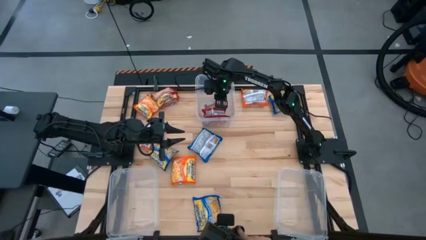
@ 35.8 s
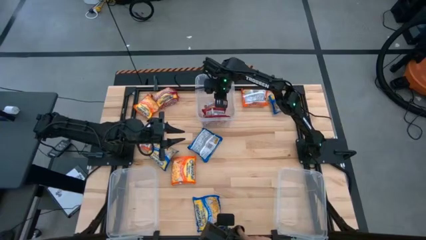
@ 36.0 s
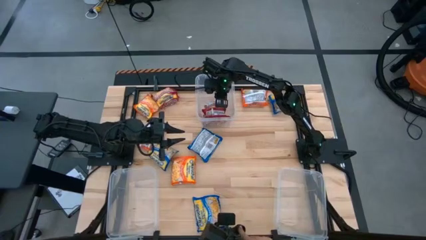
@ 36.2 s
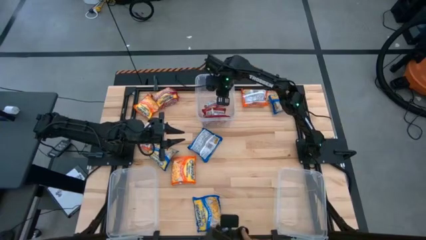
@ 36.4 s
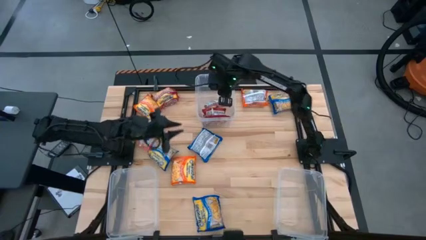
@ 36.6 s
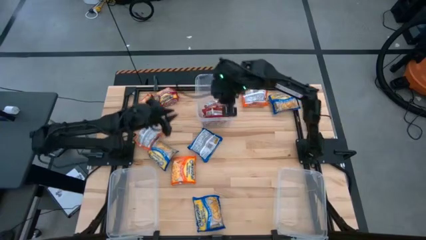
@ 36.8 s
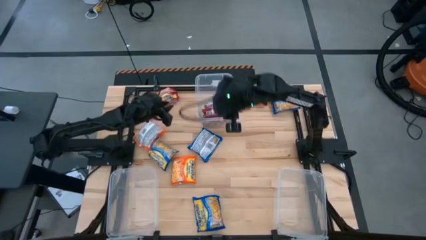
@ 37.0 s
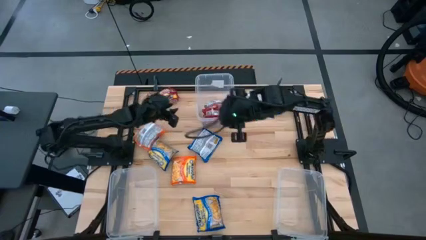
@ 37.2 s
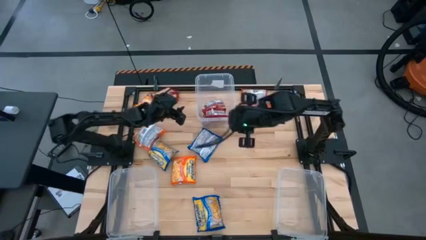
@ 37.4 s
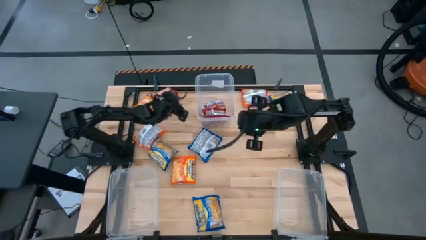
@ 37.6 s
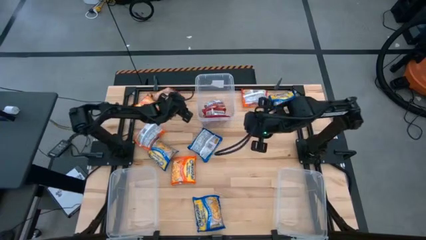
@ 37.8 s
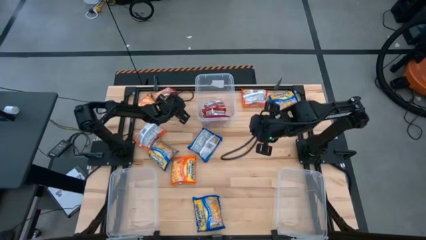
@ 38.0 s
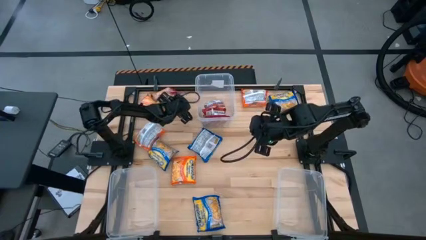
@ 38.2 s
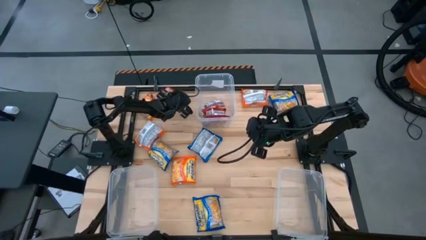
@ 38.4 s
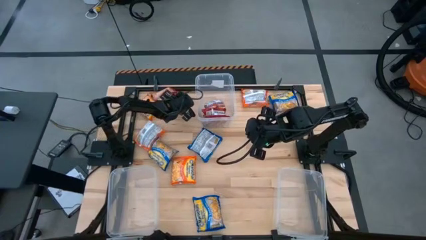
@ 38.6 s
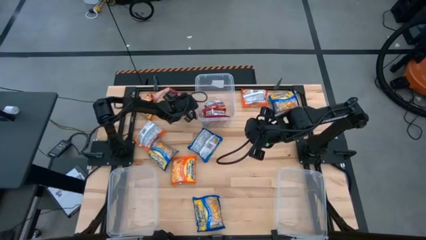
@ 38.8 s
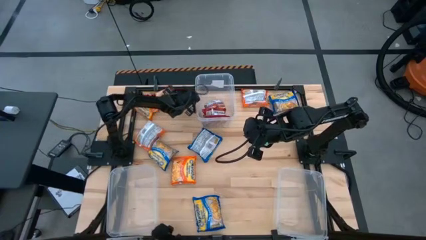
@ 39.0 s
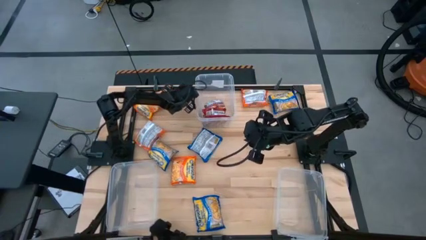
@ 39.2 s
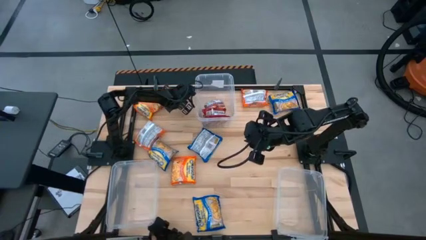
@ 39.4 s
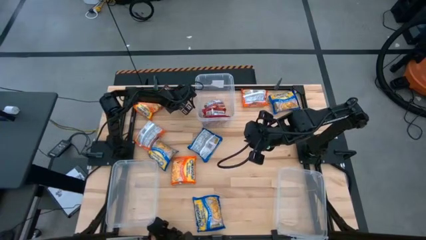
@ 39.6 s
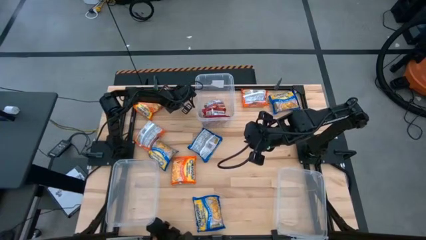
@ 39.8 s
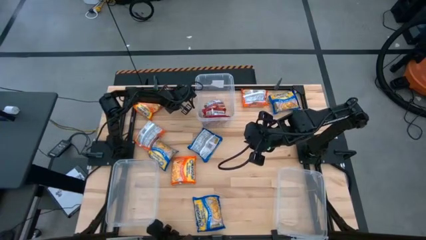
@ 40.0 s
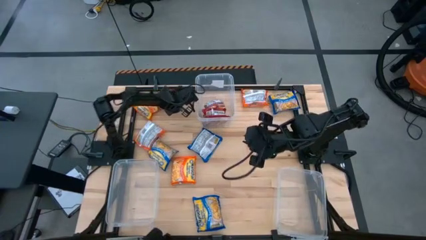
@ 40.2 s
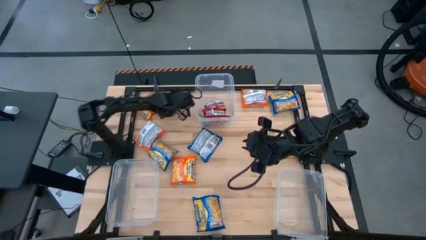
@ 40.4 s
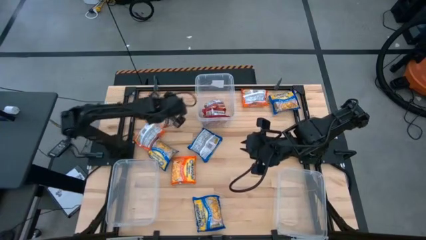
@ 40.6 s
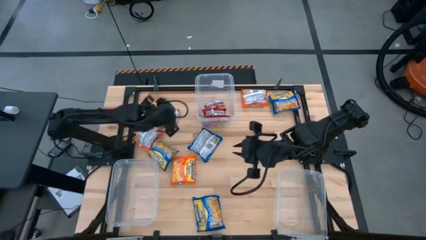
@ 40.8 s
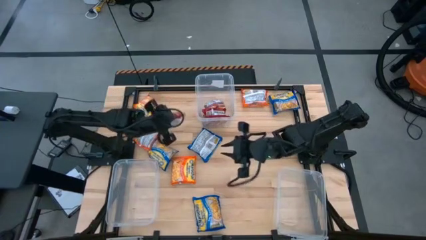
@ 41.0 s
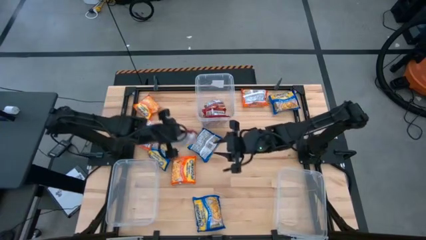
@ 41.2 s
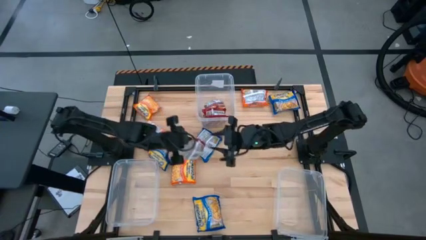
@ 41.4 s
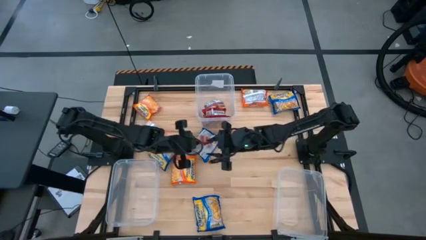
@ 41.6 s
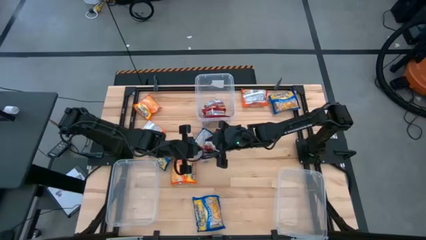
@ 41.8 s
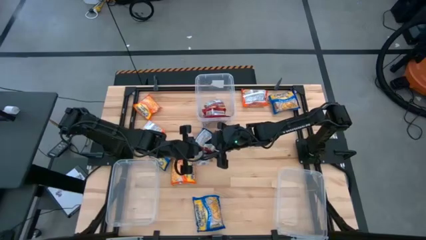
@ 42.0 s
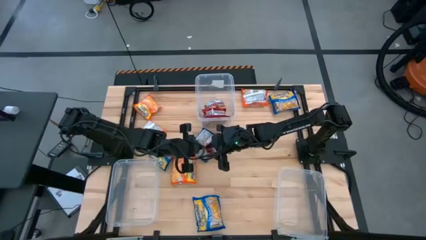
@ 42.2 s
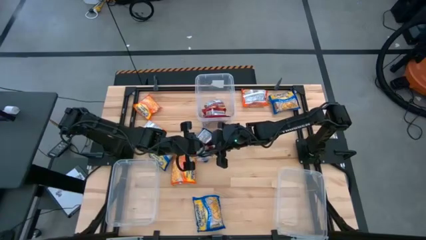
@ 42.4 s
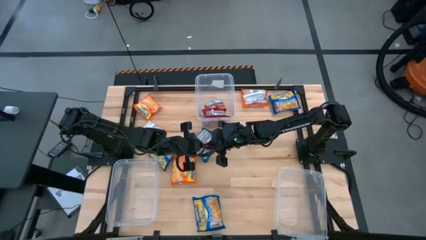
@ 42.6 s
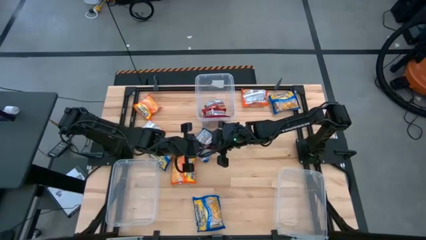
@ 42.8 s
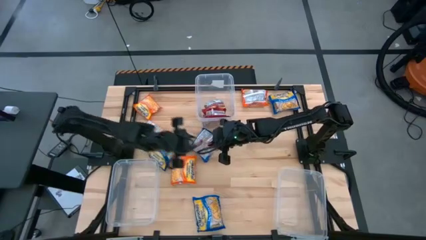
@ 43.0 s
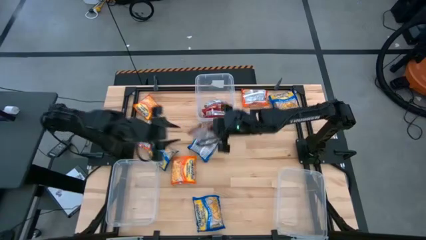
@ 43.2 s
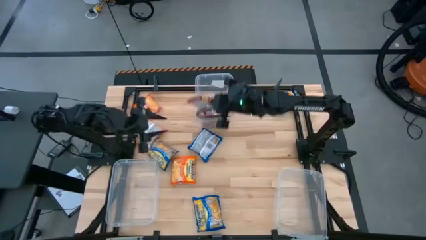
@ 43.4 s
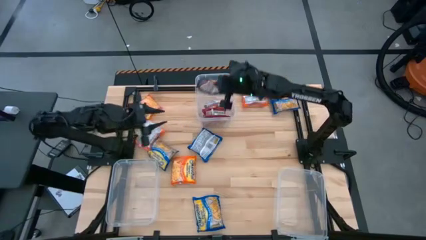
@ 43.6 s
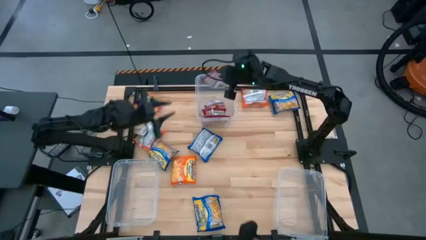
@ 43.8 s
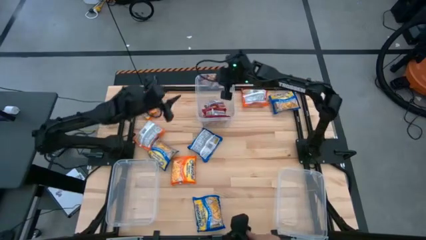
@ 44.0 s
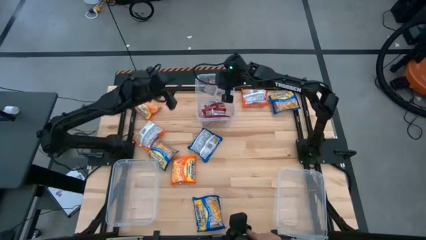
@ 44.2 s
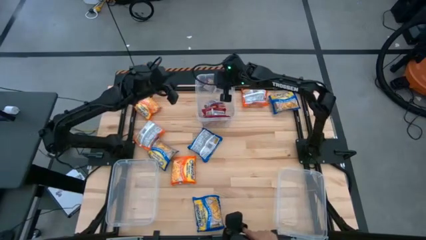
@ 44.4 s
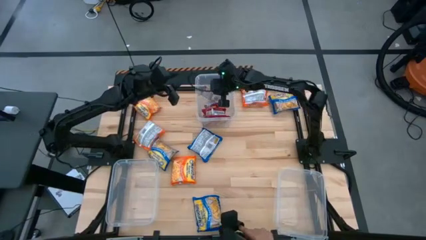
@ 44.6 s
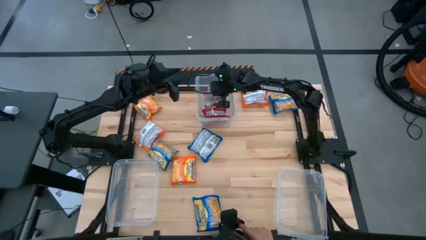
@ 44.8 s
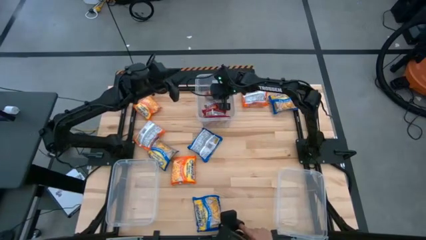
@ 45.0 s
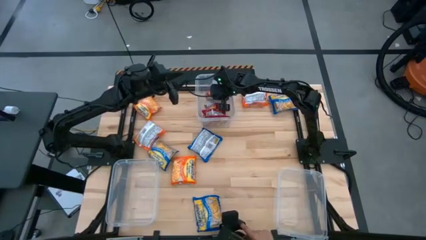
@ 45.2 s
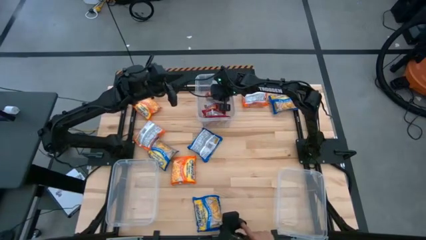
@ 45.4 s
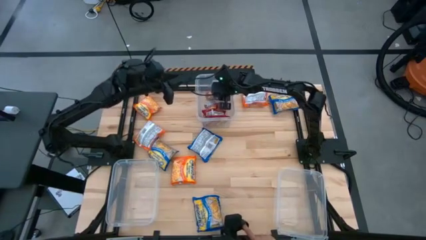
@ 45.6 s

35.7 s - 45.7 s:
Task: Sort Maruchan noodles
Put the red noodle pack into the top transparent bin
